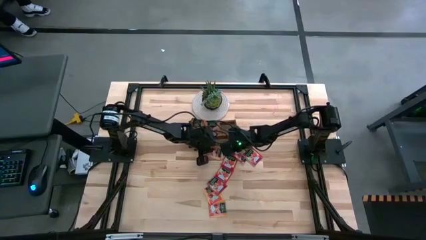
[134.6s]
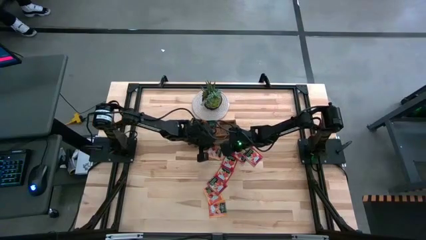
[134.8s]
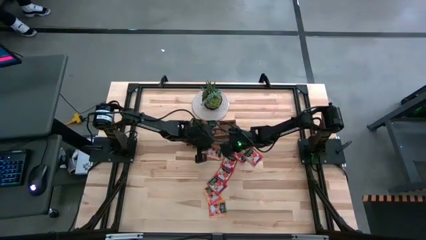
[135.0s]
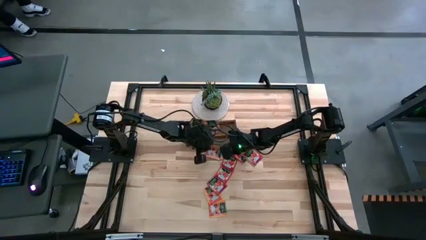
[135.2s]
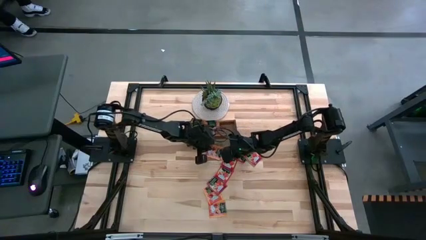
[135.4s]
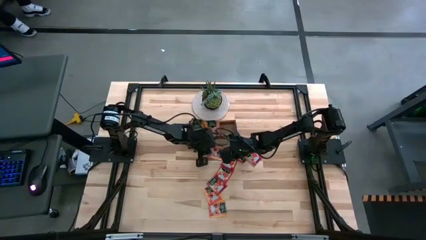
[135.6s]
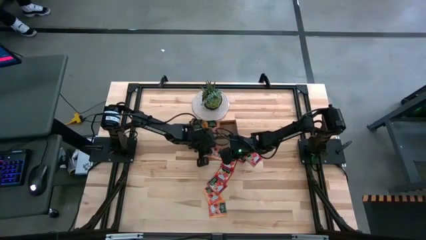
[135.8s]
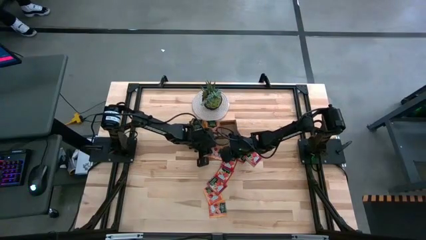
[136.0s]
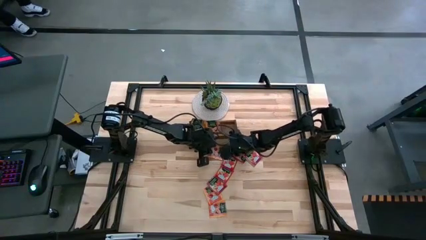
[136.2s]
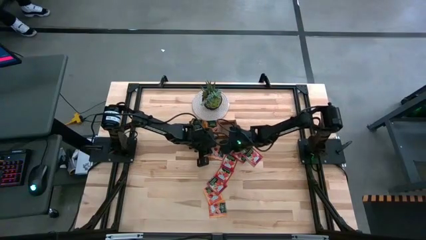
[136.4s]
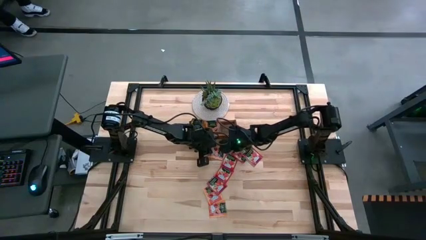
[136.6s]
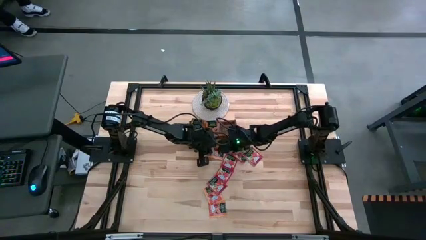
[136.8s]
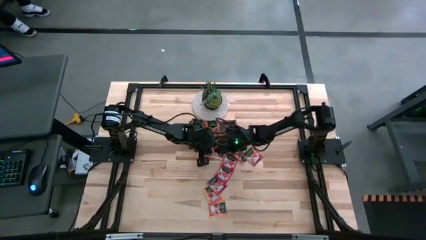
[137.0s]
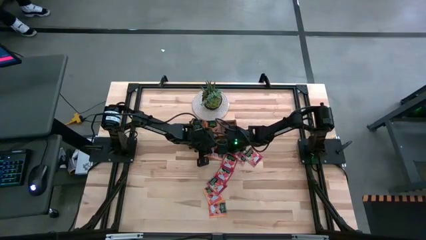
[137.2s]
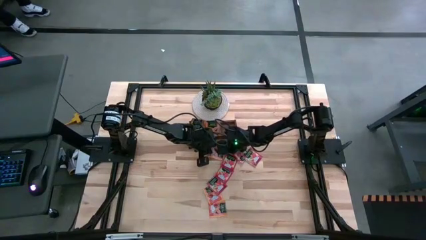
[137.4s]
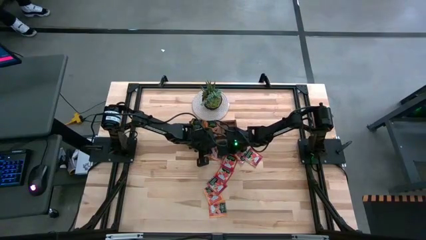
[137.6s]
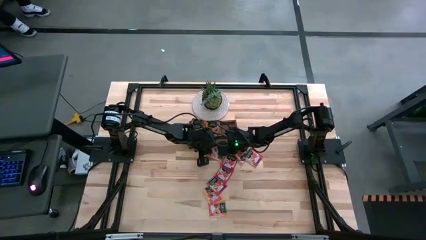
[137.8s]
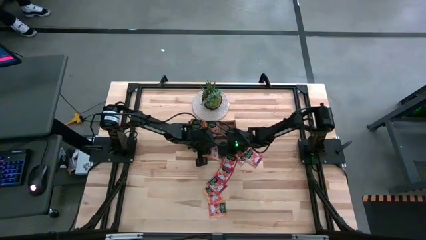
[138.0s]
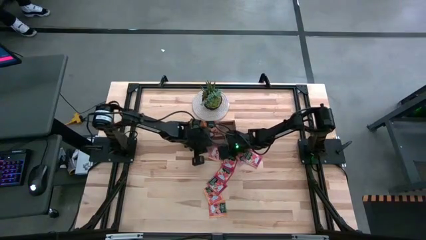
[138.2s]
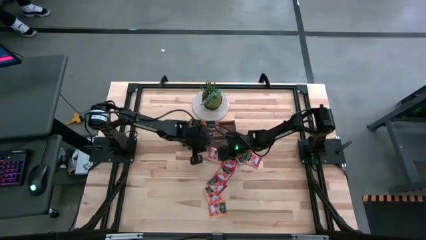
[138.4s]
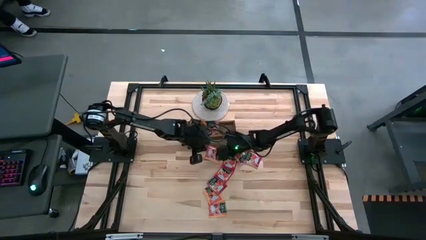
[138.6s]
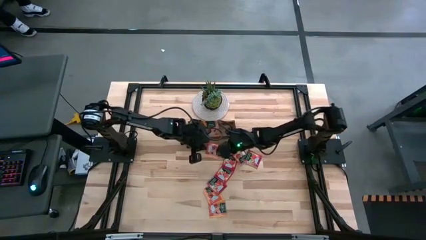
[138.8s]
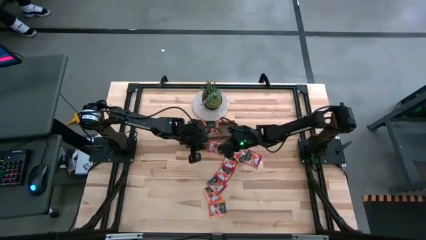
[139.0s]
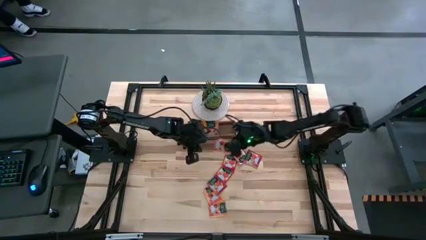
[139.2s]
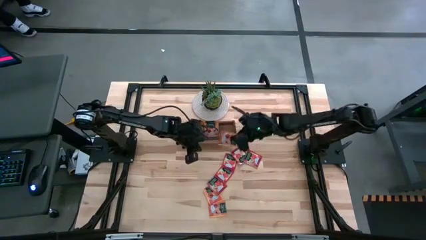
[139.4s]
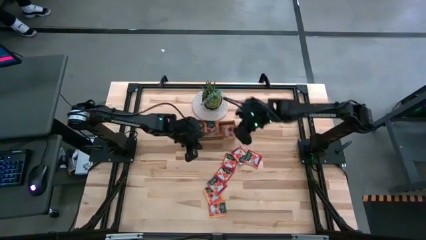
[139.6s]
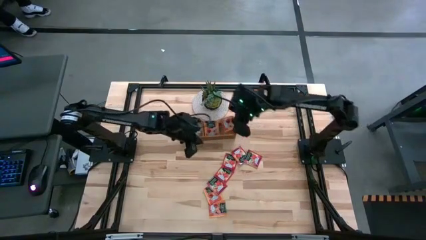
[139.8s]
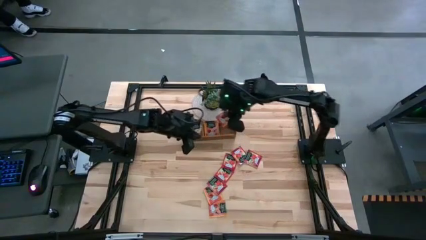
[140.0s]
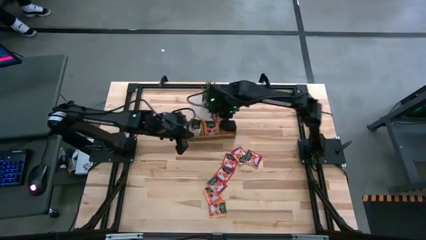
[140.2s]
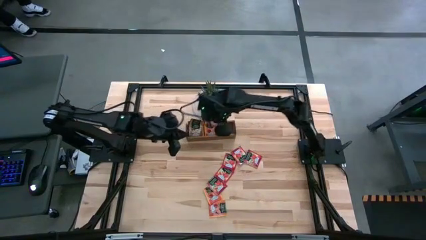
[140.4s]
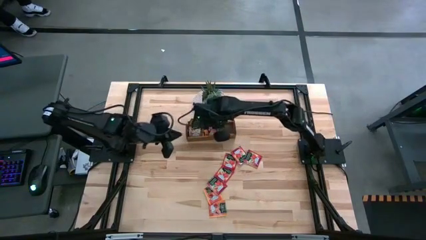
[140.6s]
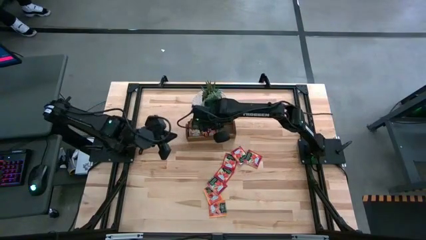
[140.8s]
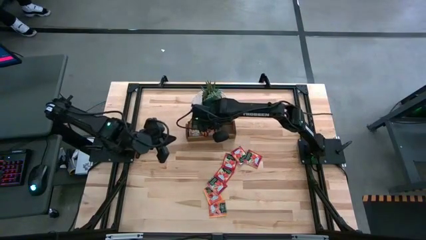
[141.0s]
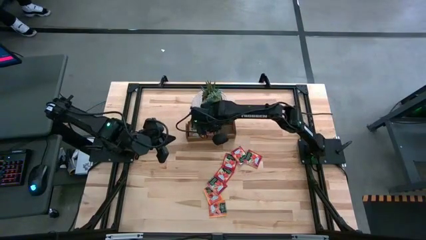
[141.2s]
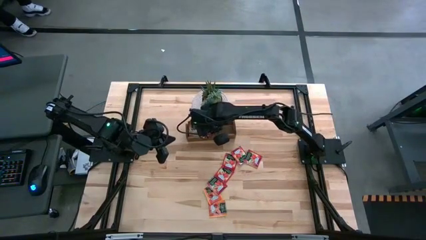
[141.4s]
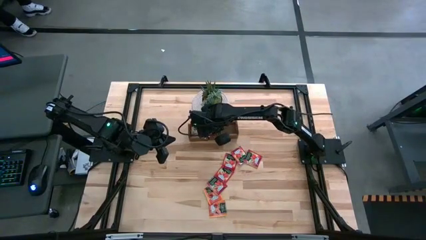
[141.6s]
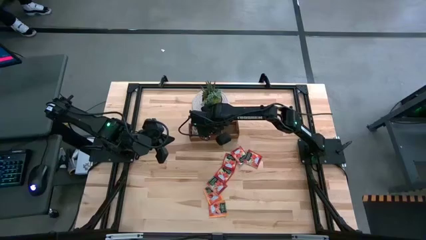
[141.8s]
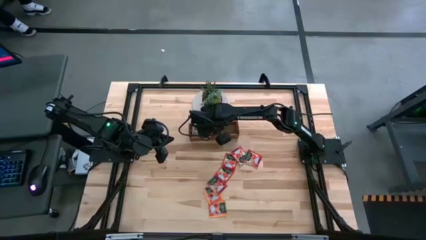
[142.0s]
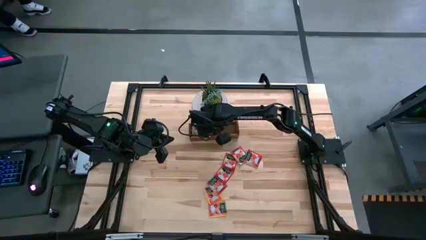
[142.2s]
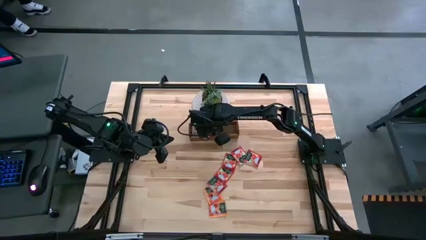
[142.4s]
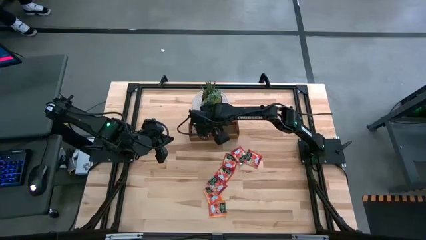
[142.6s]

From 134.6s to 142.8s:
Task: Pick & Place Tea
Put the top orange tea bag into the middle section of the wooden organizer

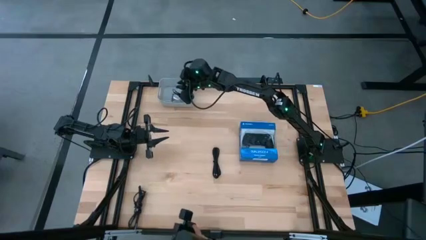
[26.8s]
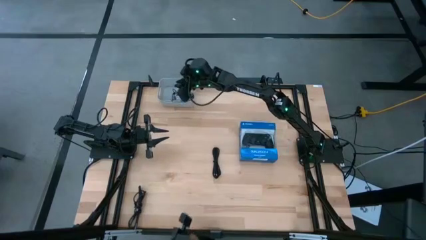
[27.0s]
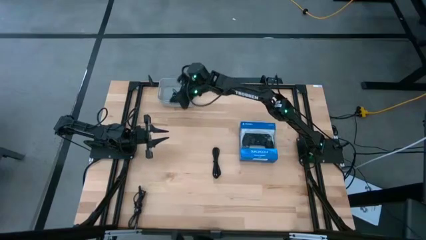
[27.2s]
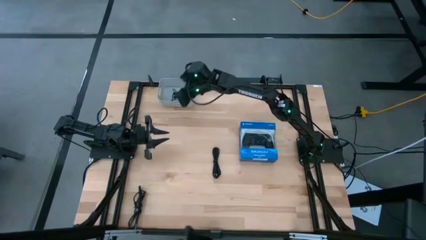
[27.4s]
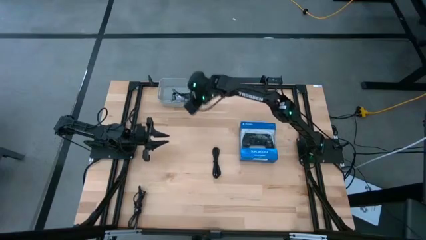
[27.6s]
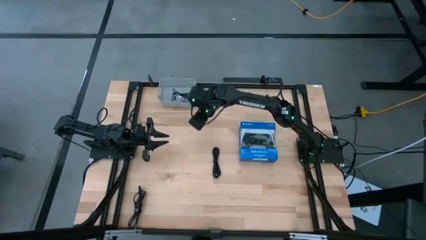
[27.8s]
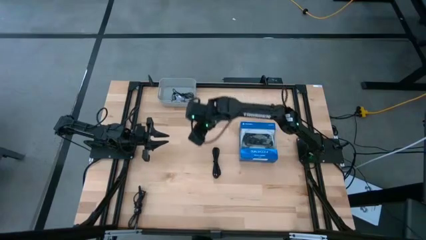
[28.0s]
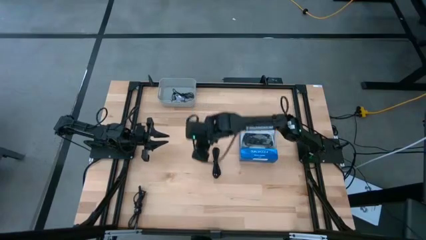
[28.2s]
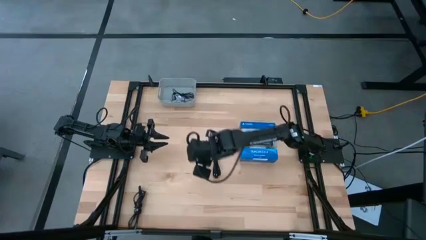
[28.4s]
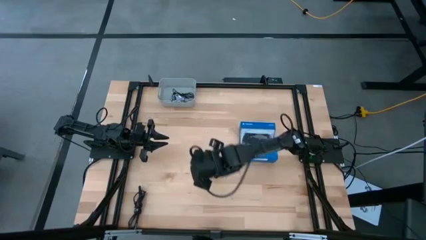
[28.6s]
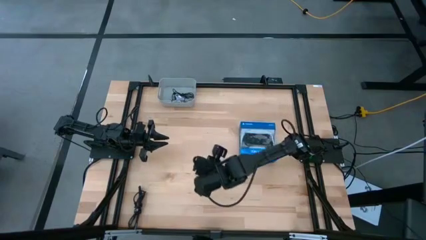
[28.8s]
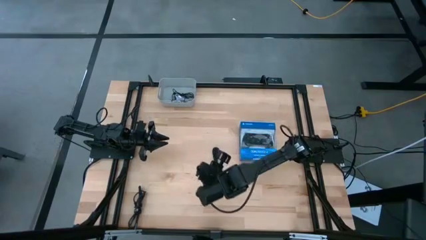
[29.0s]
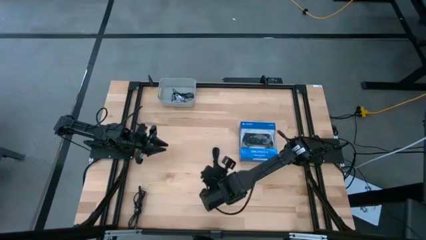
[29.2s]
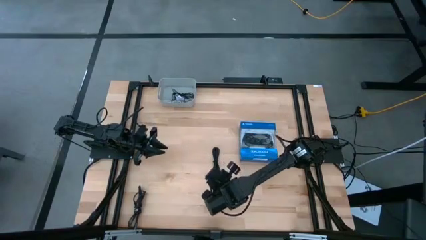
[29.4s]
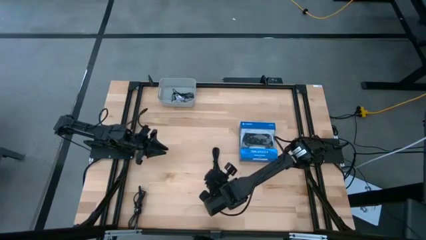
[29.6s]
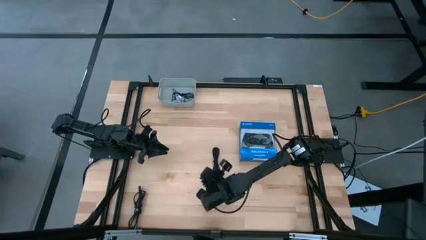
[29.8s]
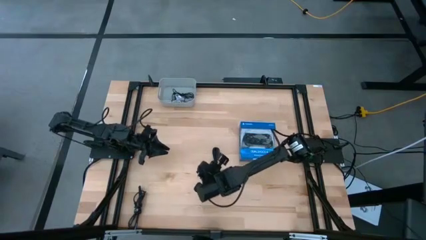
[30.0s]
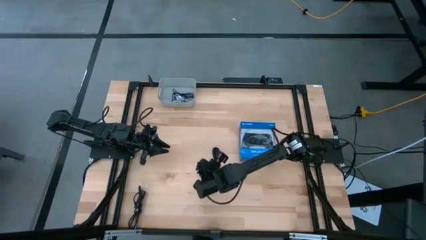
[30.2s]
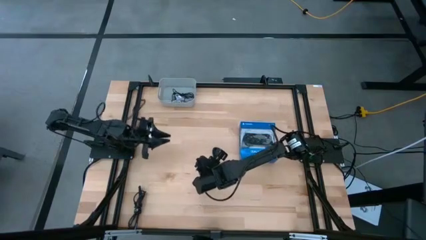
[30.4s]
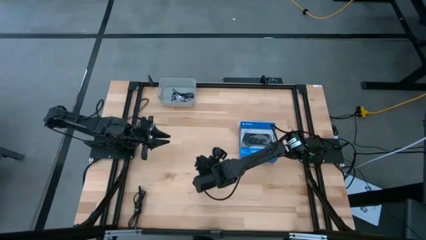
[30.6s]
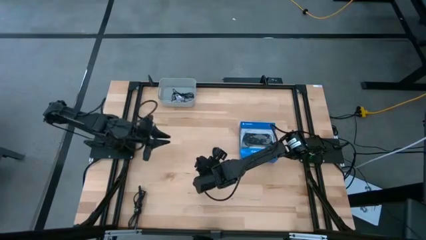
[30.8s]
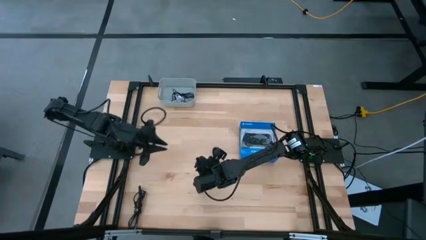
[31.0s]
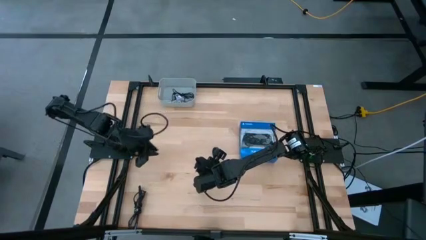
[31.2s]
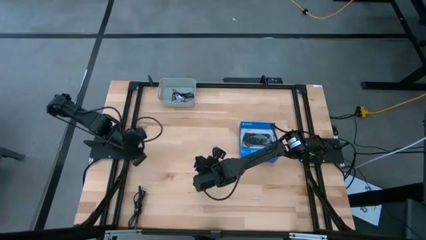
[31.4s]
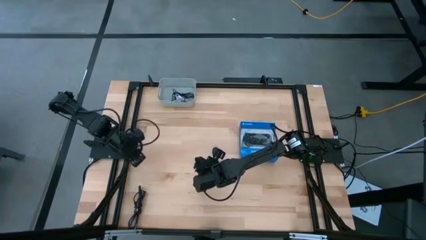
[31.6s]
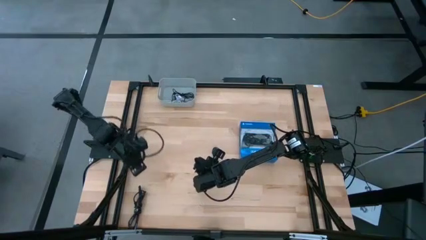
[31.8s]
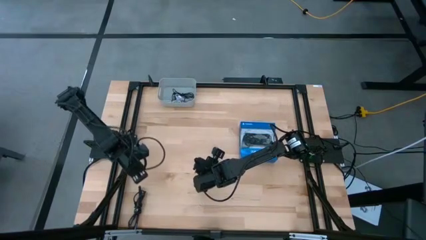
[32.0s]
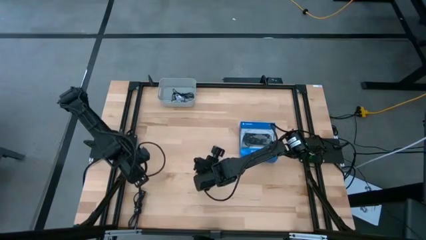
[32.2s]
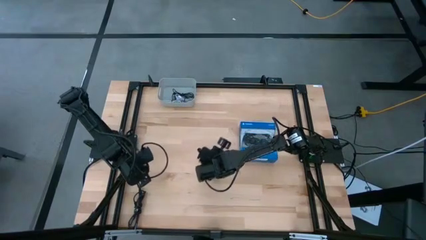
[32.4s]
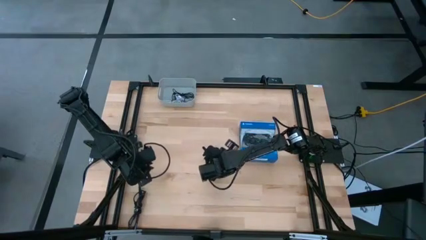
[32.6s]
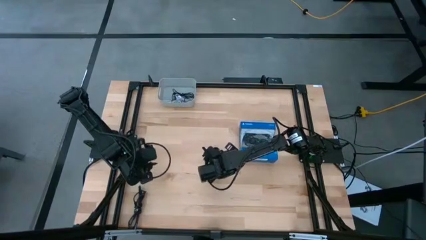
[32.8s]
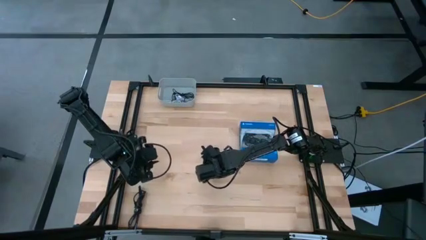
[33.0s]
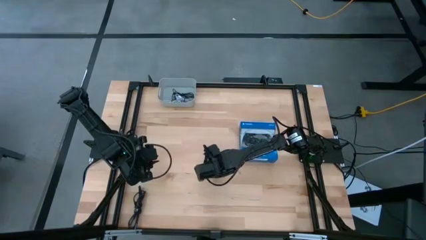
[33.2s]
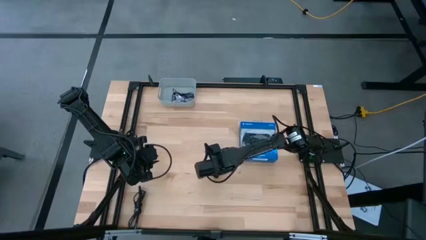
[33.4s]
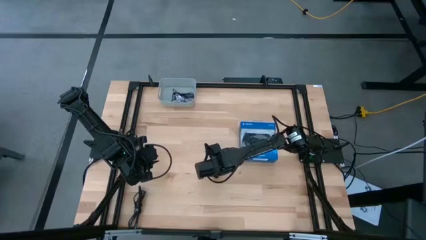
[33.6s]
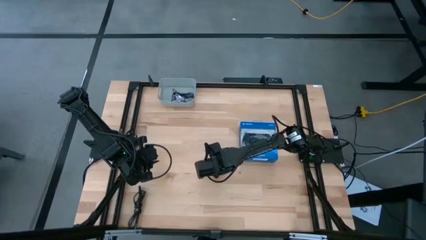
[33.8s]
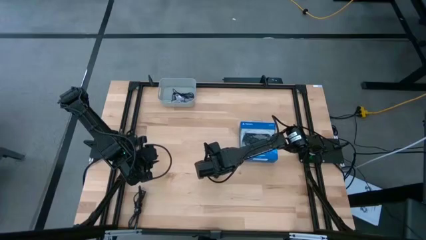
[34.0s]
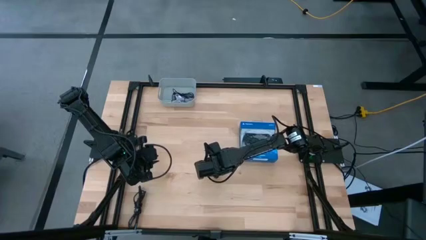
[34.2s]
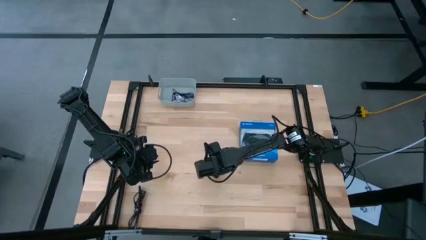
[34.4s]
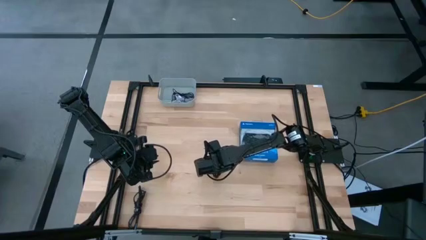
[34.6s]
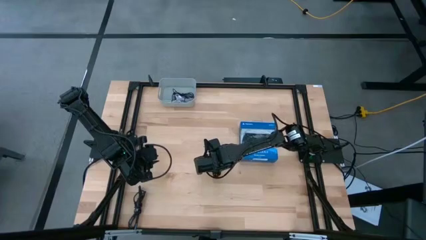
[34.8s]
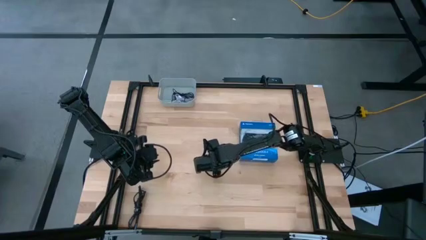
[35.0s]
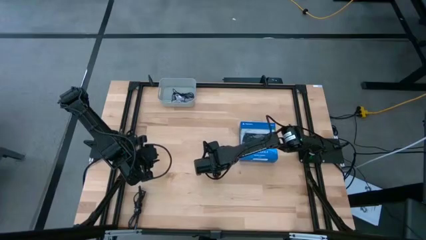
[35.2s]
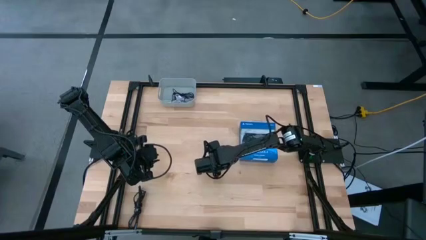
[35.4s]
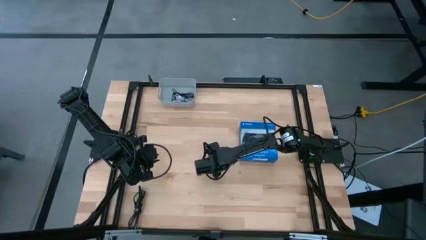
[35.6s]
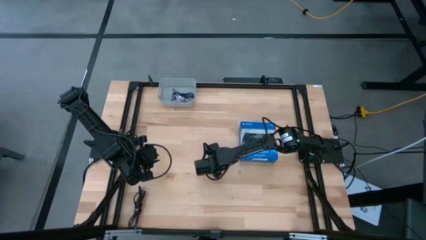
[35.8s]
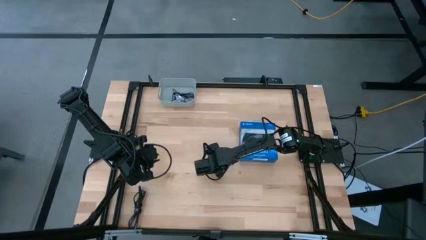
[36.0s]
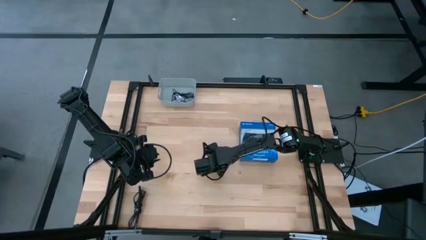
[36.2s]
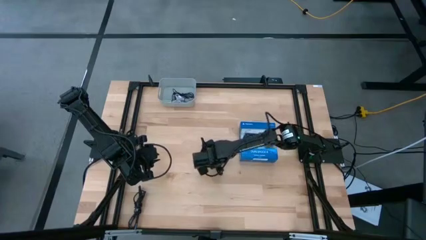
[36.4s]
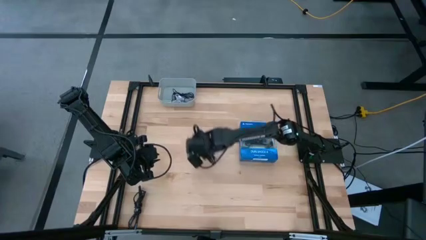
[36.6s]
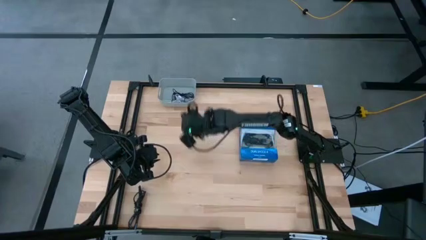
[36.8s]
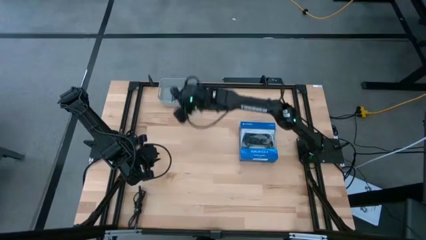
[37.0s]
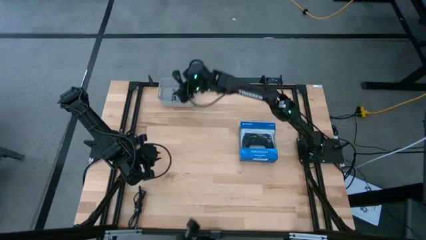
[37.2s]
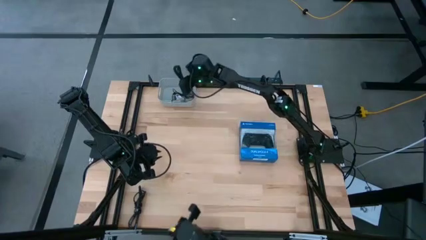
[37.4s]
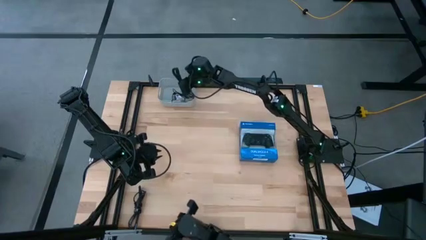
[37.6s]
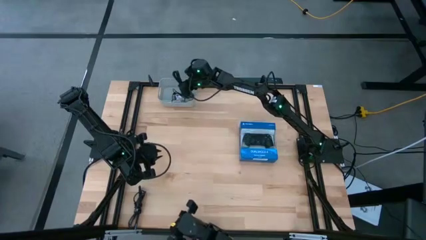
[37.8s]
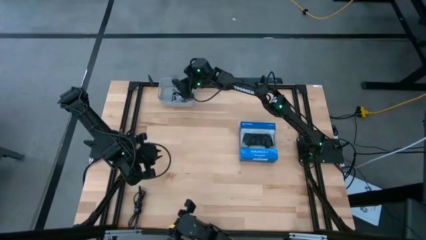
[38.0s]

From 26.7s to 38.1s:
Task: Pick and place USB-C Cables
Put the black charger cable into the gray bin
